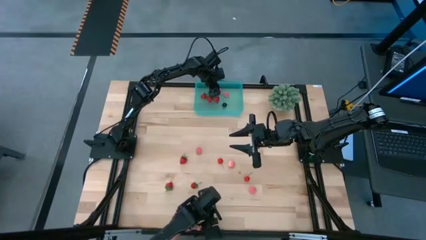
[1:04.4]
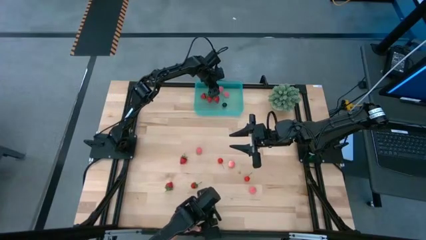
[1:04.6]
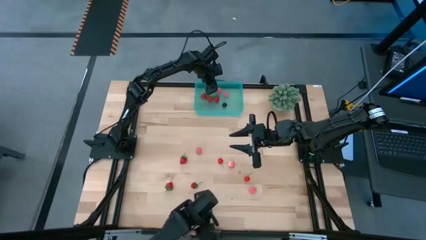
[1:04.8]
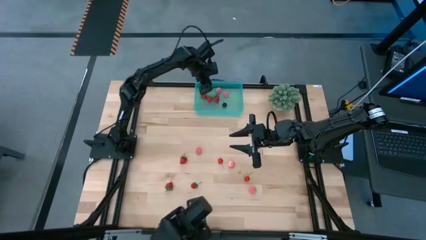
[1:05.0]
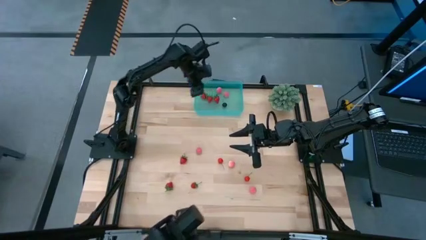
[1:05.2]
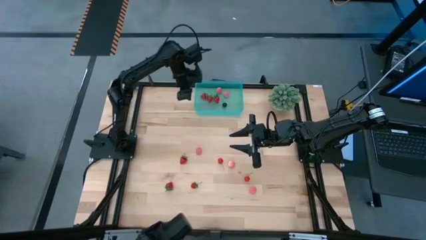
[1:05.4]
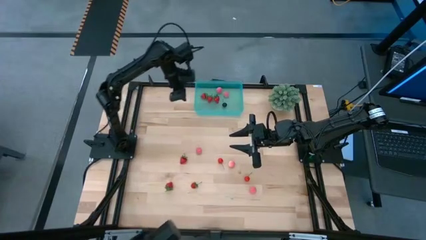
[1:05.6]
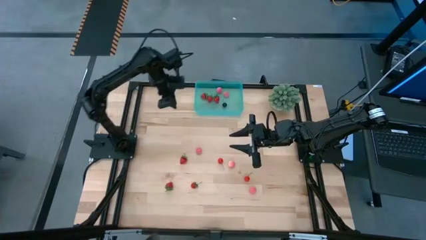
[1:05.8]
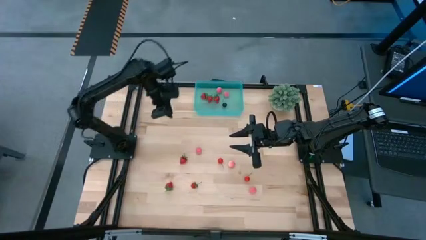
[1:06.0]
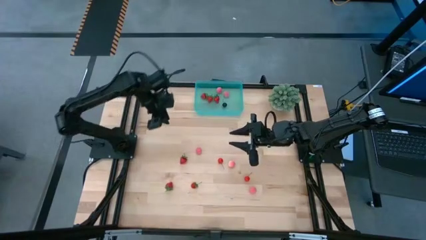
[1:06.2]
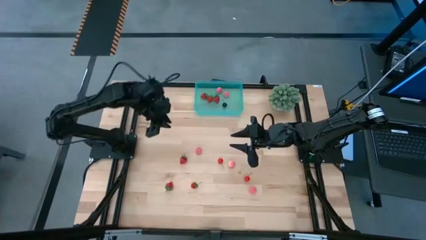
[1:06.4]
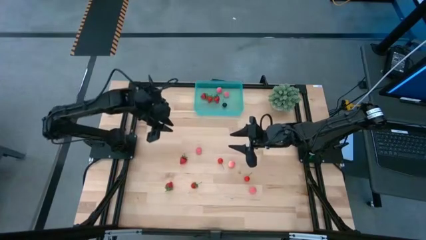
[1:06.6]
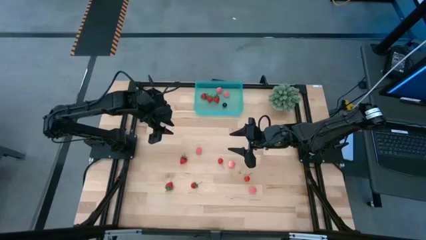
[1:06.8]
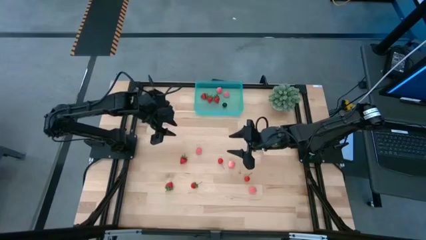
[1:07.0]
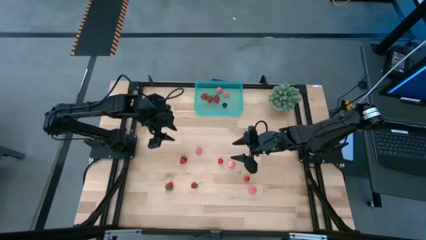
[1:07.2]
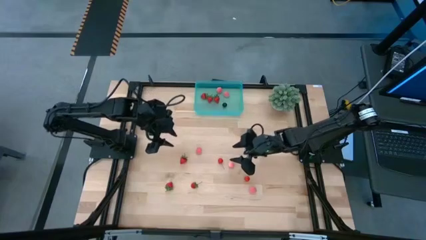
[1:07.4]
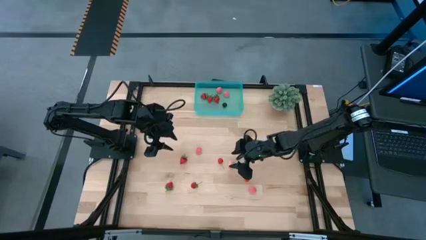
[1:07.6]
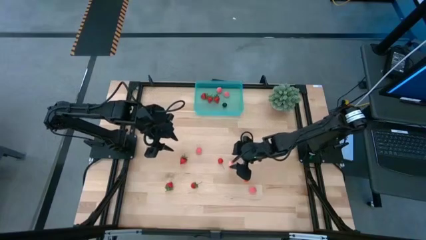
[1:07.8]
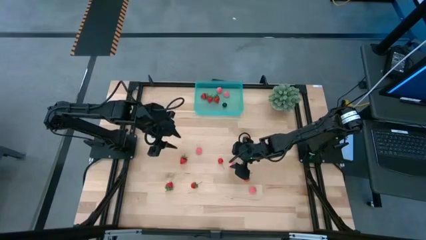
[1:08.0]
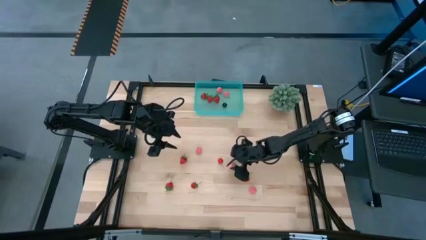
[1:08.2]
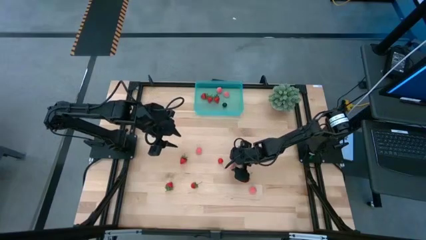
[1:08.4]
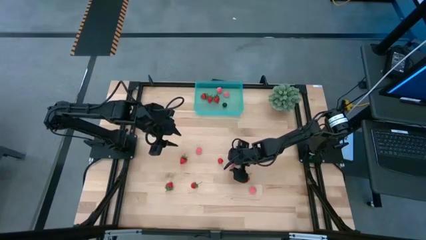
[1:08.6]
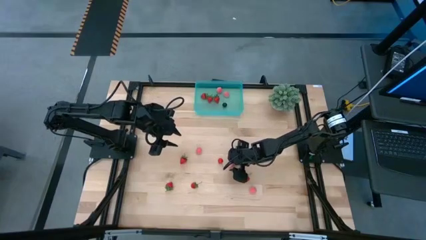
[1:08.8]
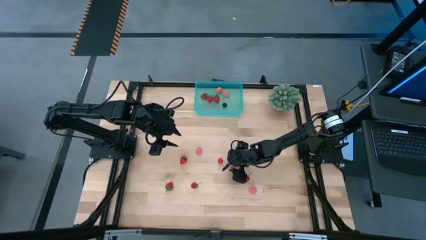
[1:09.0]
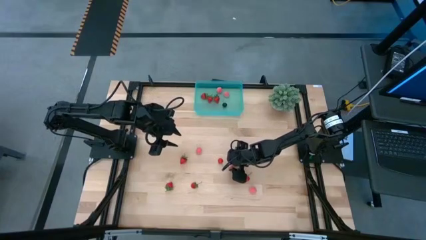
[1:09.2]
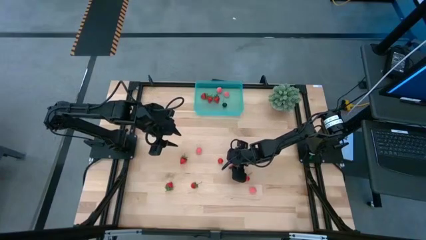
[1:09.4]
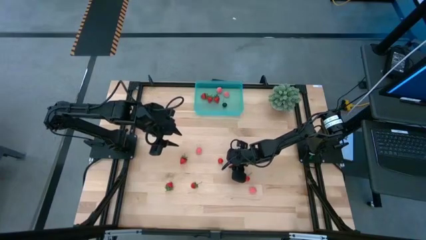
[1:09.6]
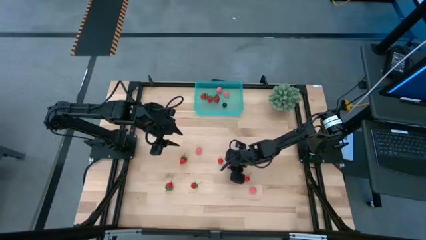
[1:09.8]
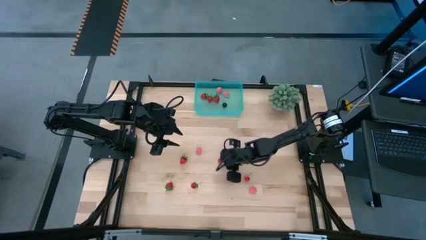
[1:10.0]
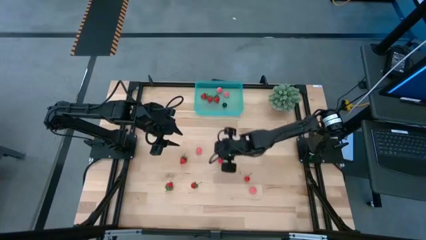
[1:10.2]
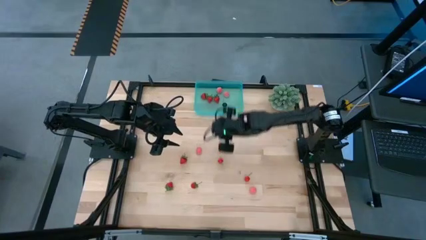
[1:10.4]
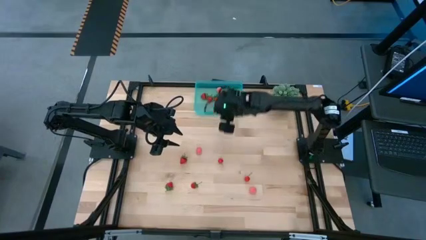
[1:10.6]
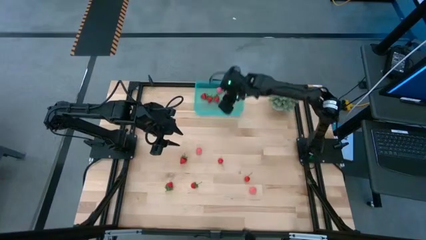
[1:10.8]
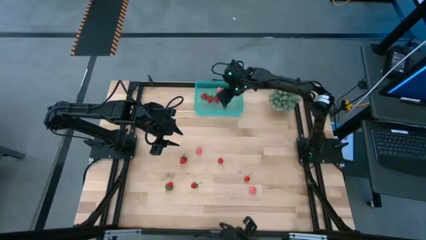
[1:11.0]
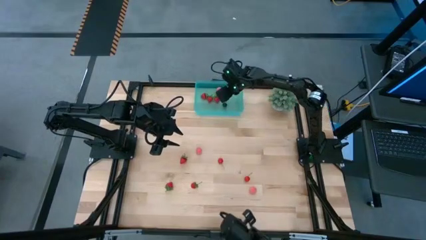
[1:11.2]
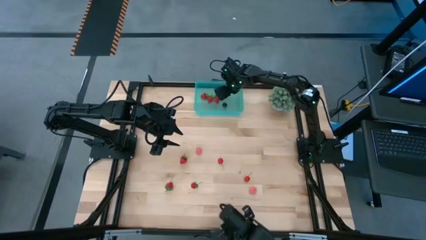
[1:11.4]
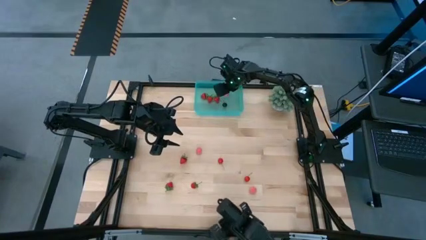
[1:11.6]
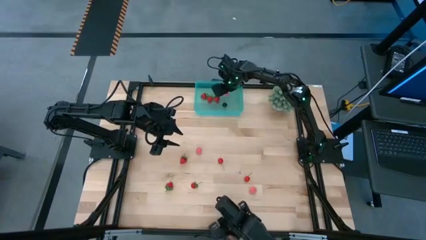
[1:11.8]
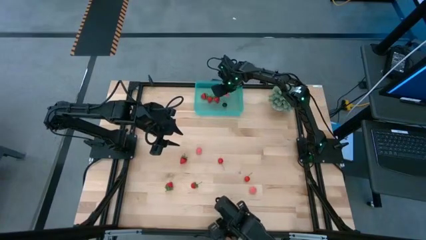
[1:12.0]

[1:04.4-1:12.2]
Task: Pick and placing Produce into tupperware
Put the apricot into the blue basket

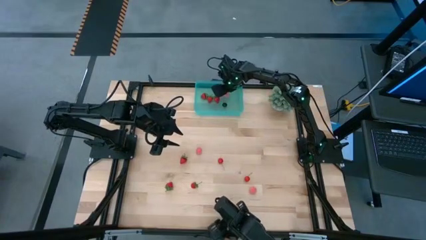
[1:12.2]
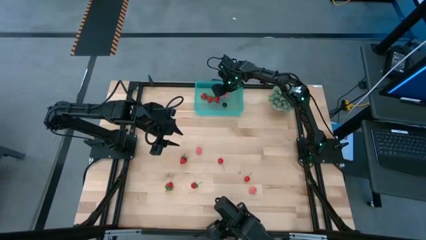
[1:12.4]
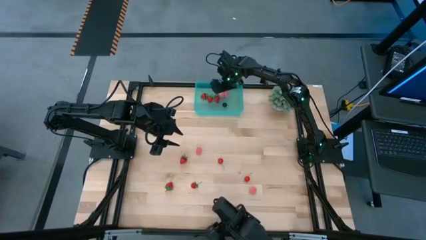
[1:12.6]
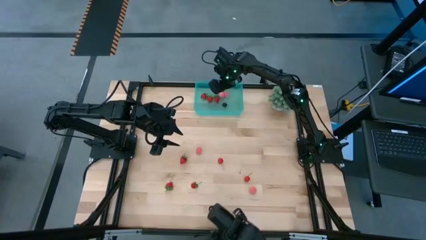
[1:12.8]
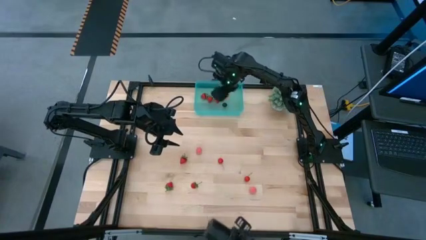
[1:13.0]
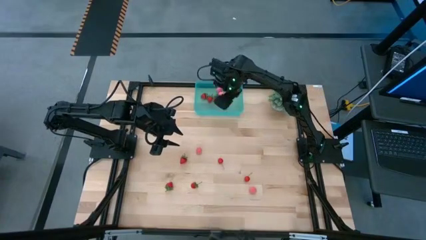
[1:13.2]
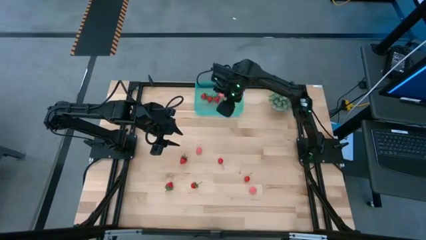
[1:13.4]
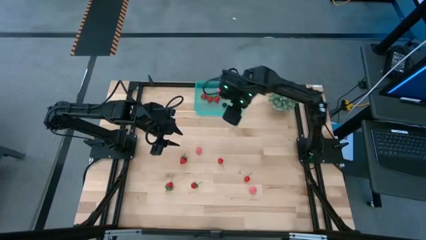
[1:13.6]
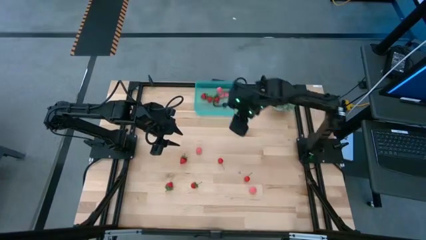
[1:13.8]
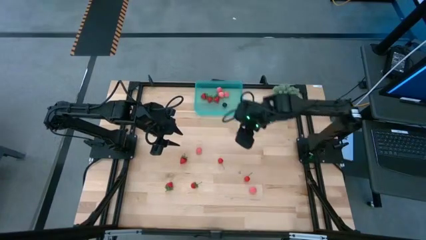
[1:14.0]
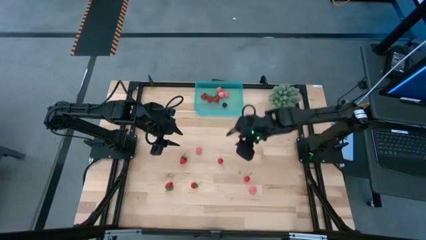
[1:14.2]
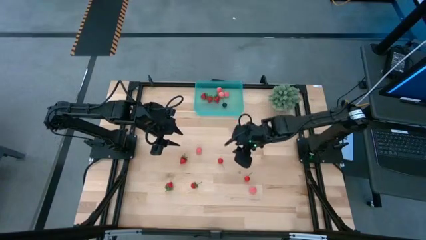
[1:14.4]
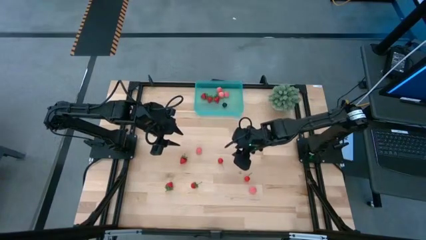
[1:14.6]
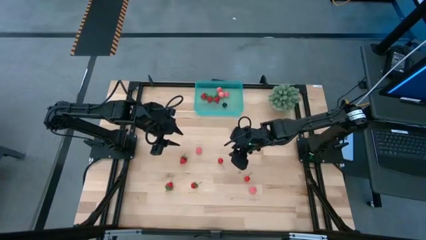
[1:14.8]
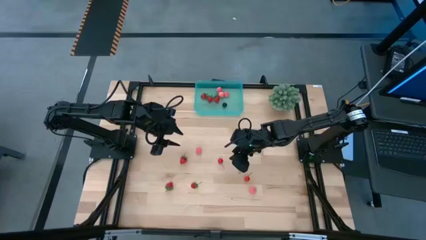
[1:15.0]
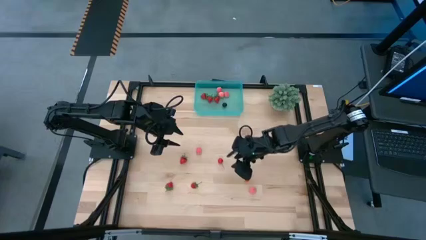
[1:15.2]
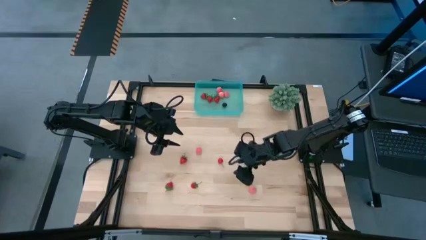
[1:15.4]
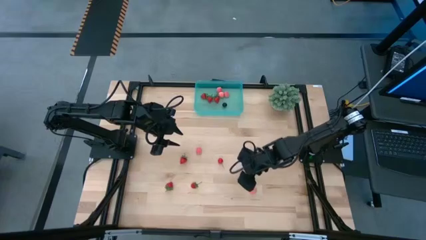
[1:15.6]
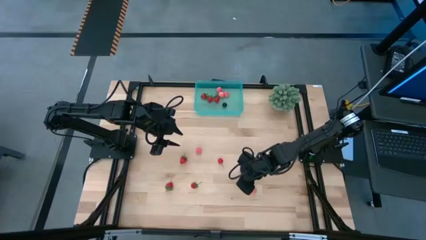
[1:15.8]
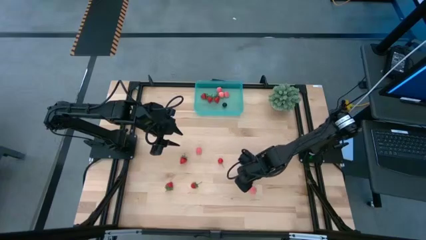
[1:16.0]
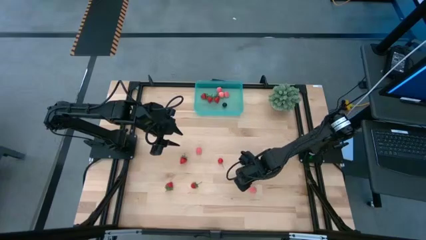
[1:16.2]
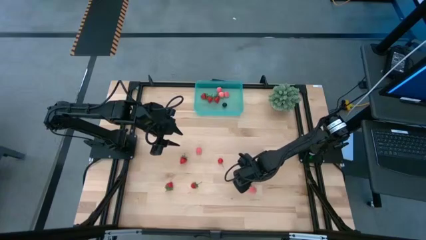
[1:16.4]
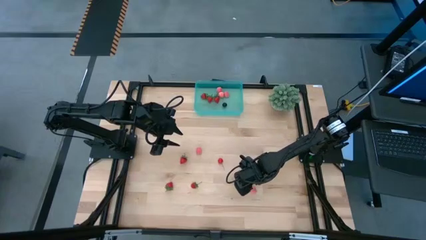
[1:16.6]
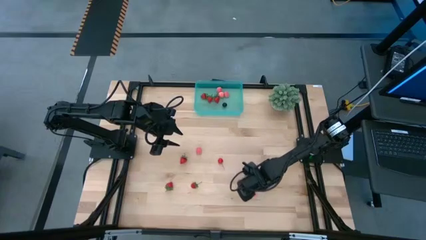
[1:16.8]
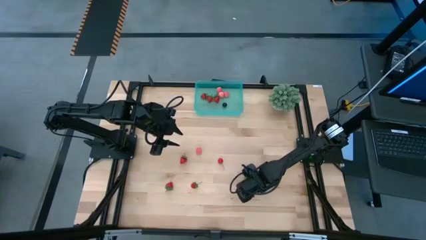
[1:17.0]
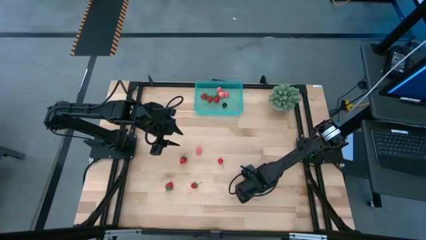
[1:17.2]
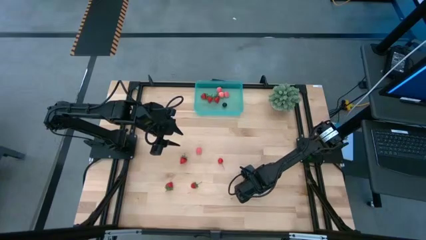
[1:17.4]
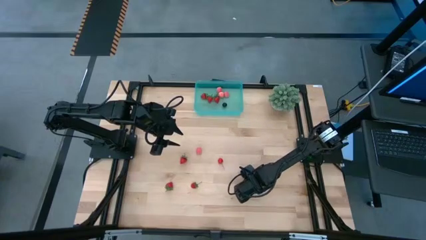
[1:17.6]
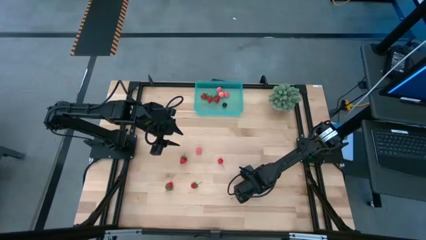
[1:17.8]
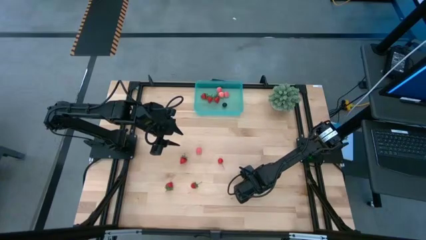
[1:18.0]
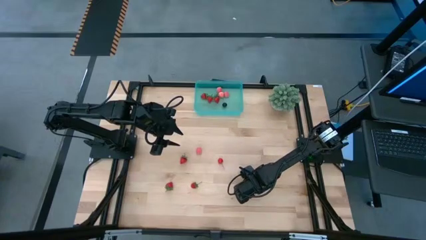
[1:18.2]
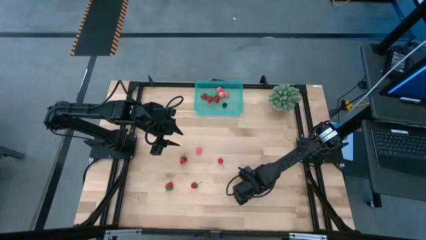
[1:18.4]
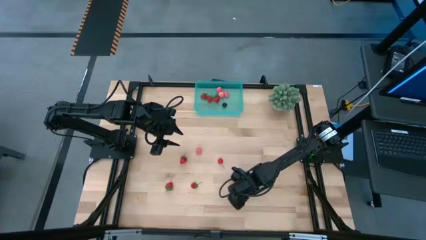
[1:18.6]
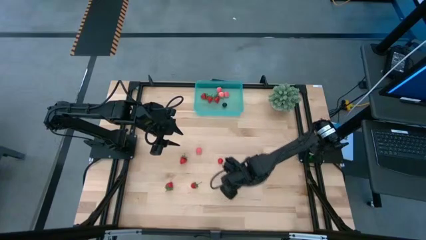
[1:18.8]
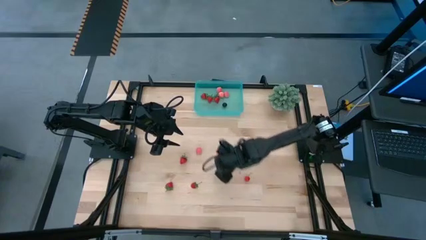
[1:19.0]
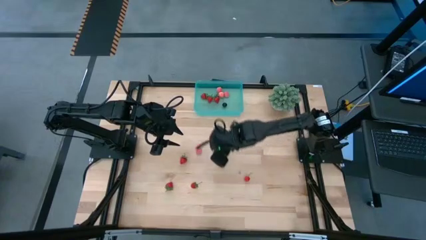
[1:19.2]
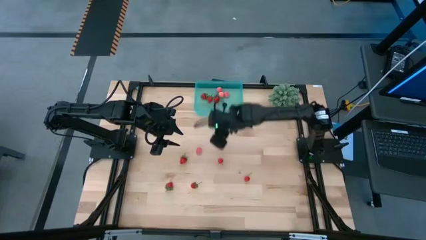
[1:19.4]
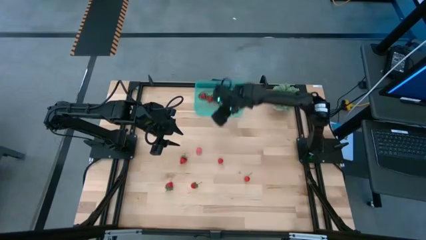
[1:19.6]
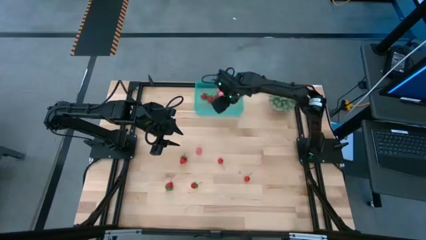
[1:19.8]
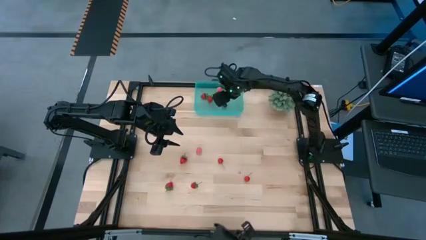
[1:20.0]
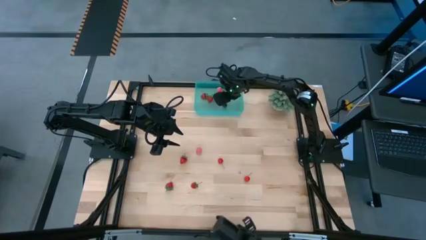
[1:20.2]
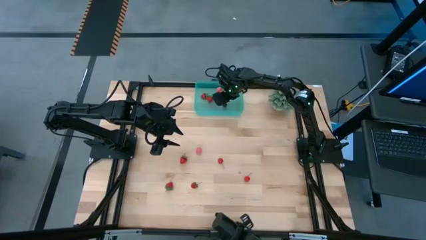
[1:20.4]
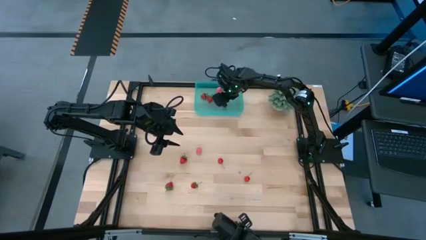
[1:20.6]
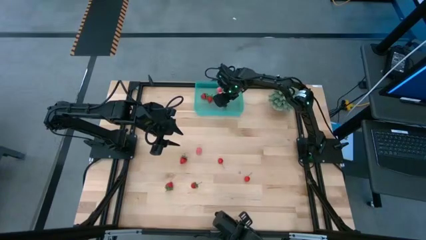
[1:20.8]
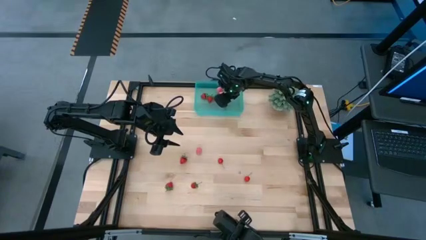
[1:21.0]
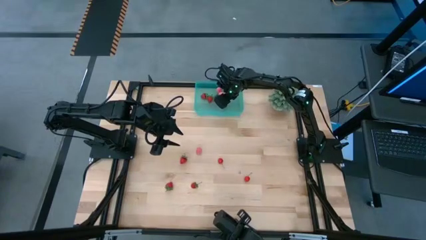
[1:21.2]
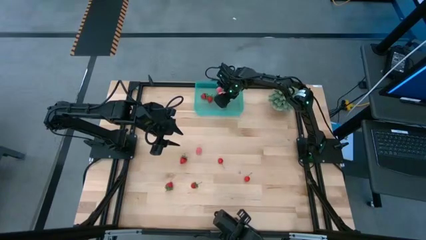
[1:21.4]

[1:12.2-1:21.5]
Put the apricot into the blue basket
